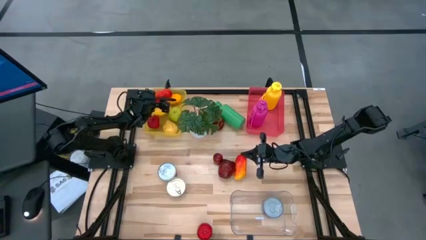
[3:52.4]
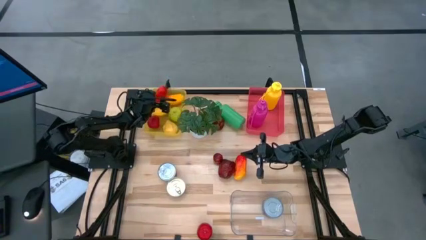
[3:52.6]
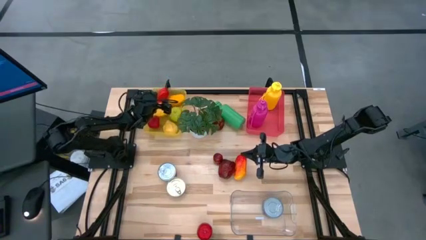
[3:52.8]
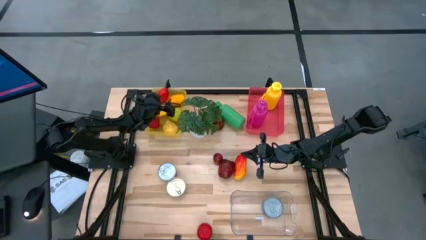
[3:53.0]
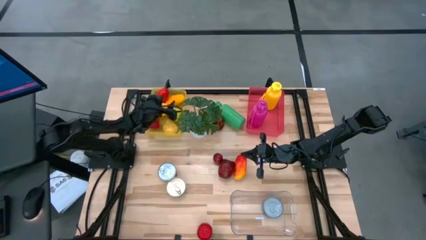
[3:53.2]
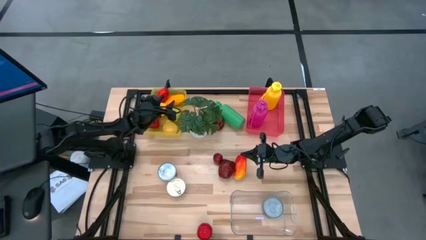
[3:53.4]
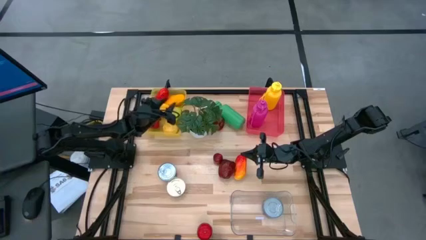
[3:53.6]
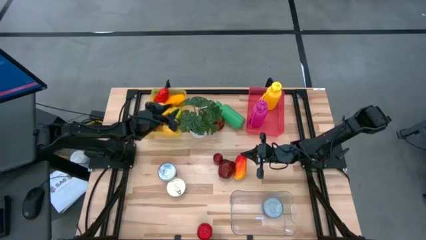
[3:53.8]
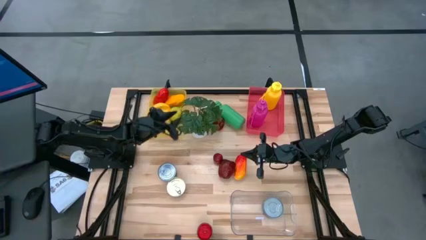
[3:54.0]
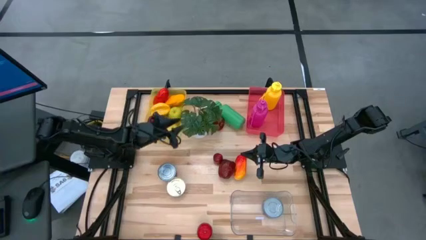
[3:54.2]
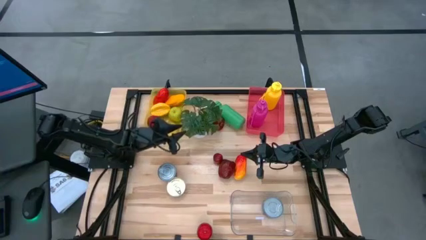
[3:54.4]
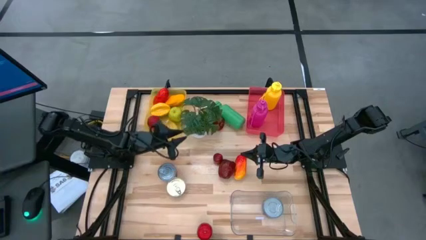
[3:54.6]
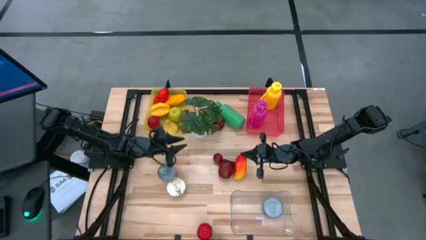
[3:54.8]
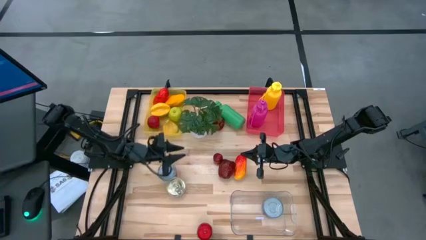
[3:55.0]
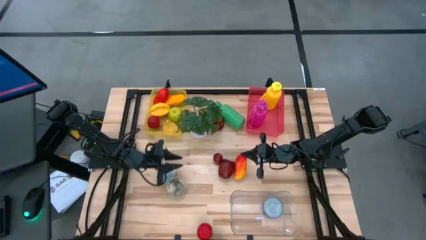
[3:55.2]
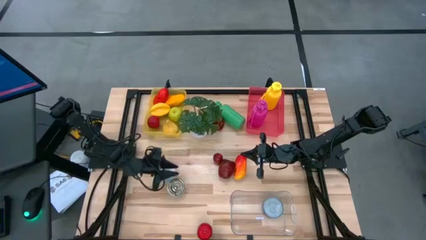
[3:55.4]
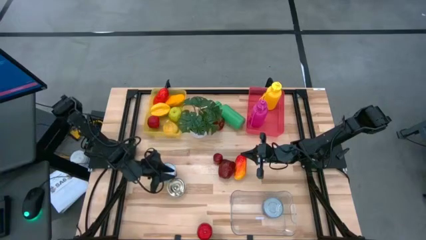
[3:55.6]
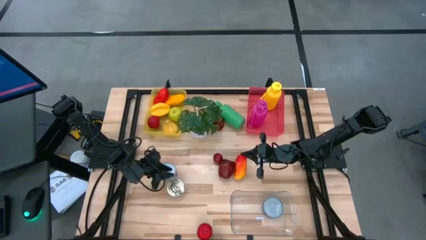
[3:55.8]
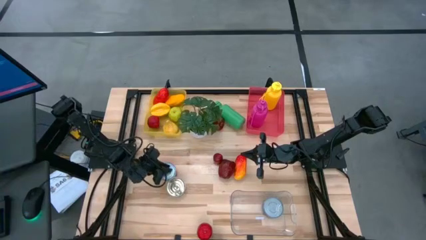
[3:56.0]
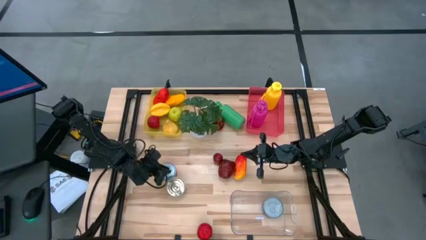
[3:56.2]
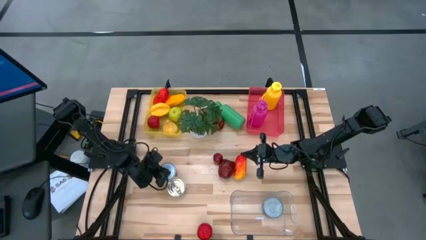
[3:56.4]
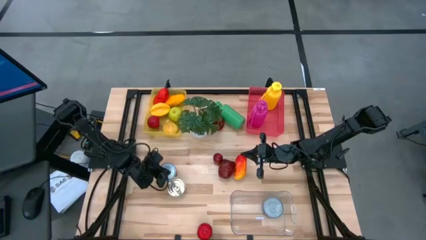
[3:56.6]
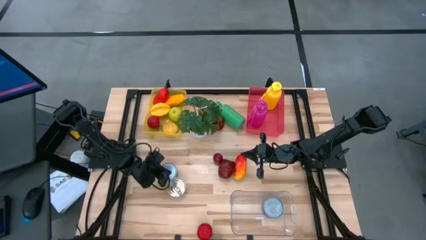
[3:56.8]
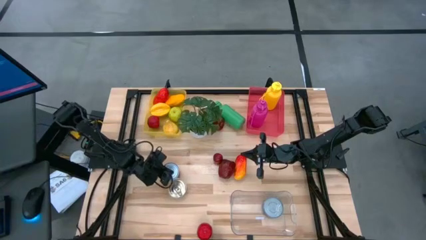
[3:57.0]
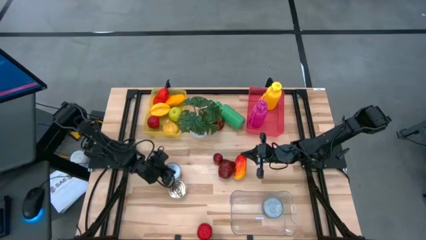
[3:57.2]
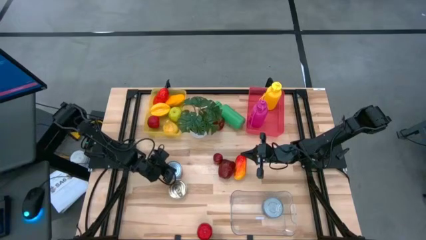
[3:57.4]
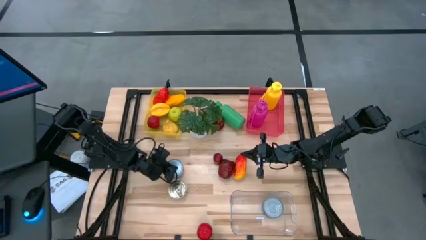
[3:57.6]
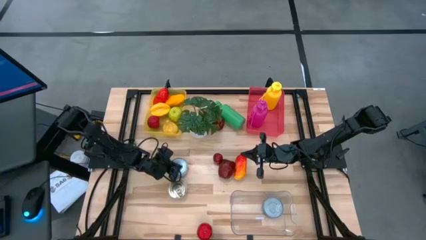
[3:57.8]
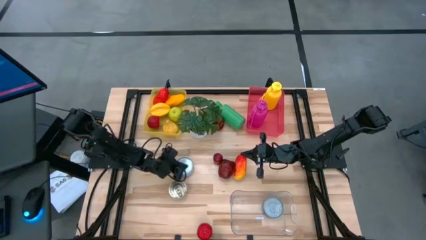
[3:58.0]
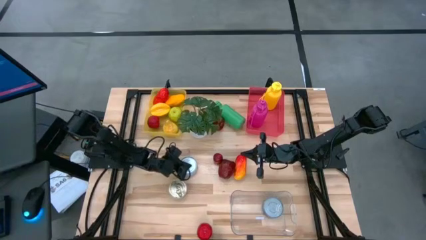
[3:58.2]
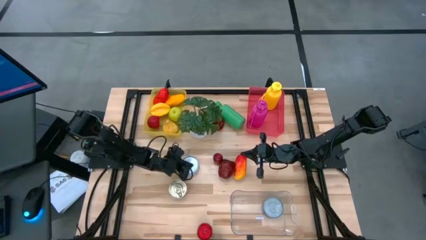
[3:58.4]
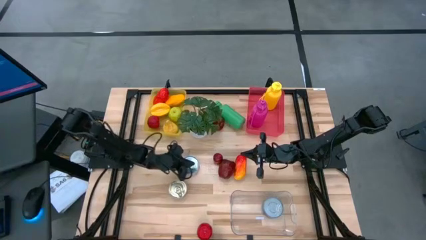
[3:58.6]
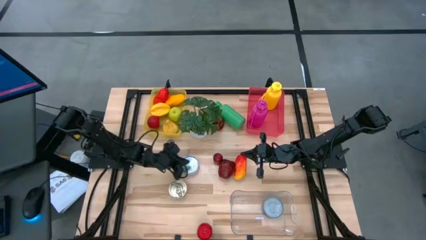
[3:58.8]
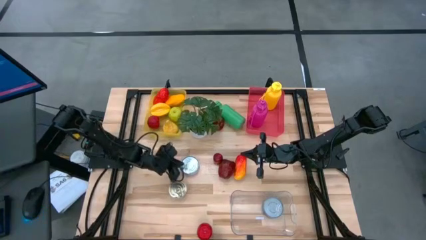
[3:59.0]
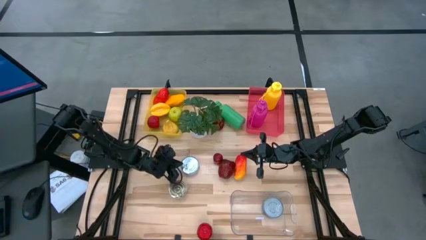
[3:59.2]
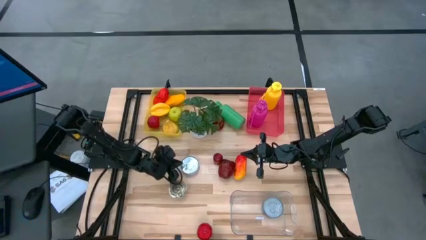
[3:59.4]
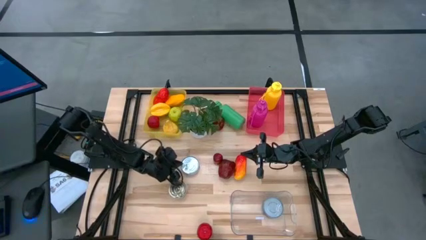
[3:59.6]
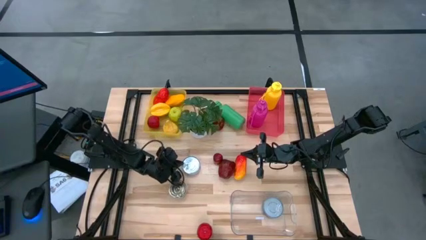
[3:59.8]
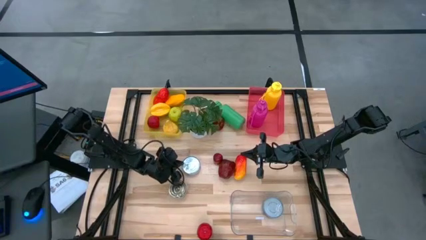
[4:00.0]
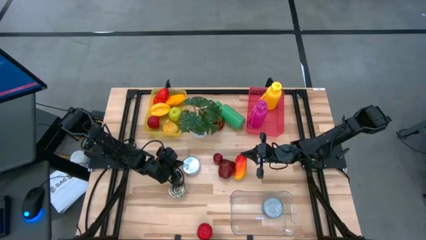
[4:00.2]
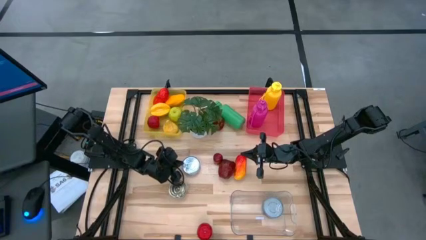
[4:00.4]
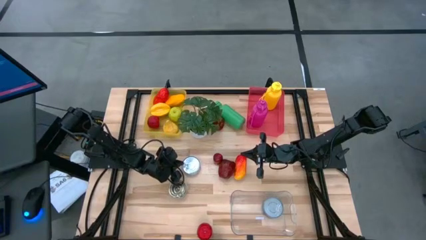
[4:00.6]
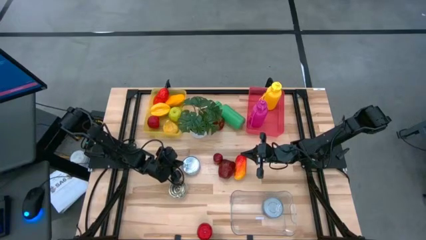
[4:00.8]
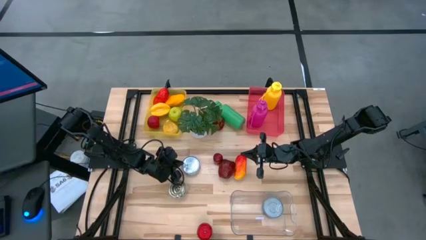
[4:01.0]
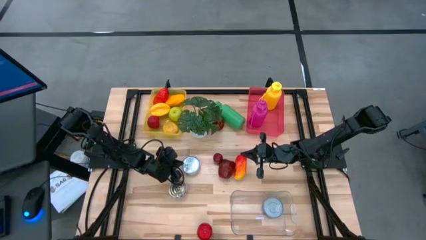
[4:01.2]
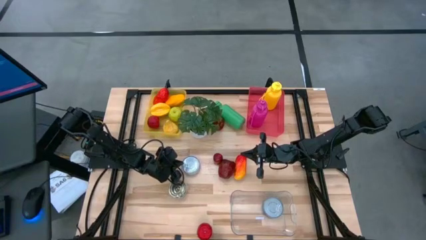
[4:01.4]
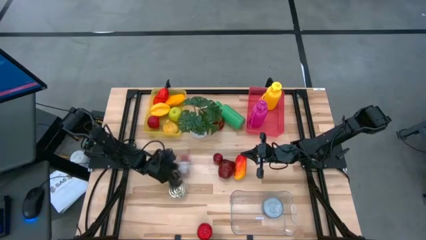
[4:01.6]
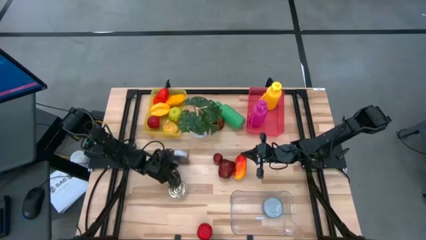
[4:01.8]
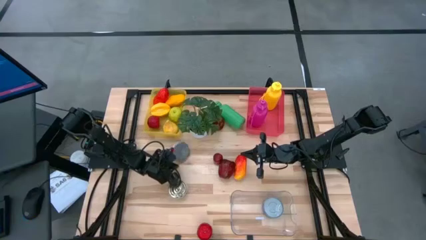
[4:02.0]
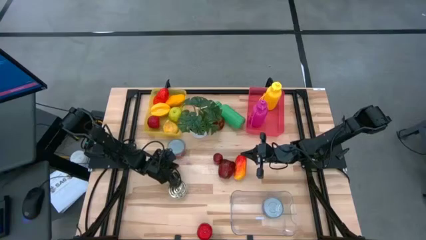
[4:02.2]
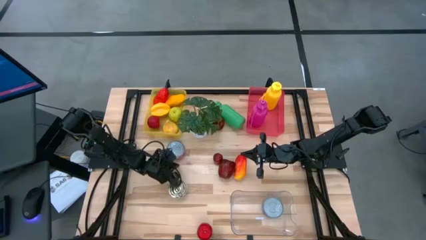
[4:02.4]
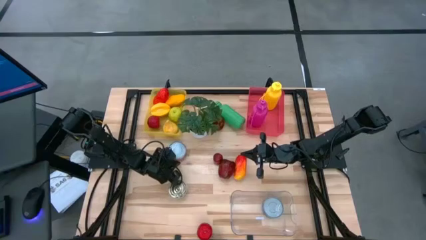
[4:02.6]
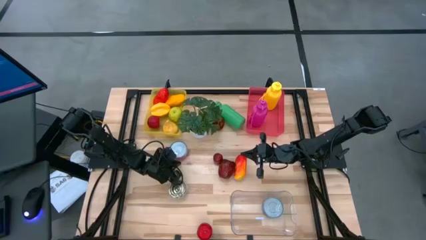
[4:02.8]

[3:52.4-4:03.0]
Task: Pick & Place Food Item
Put the red tuna can into the transparent bin

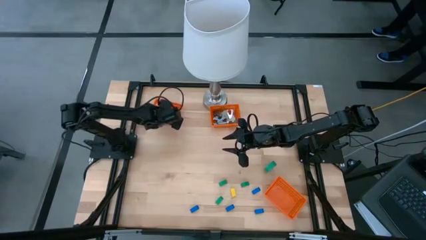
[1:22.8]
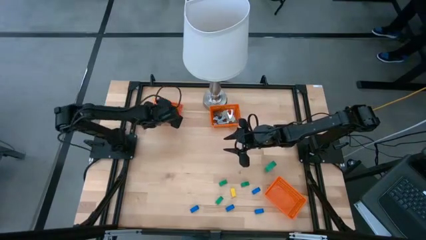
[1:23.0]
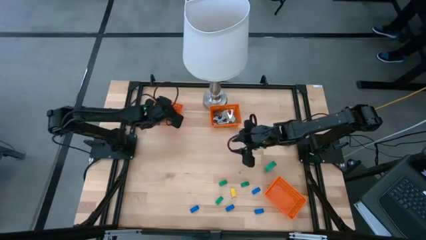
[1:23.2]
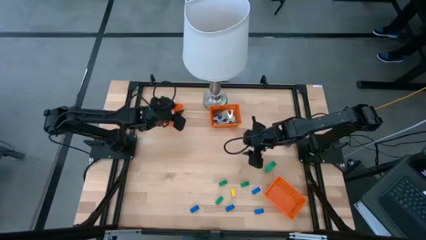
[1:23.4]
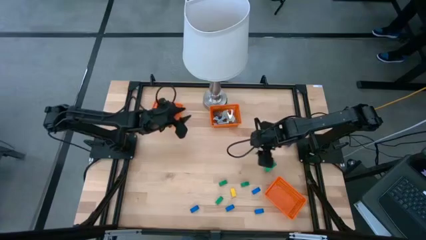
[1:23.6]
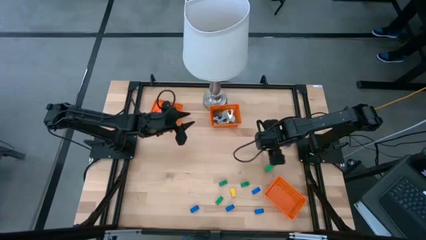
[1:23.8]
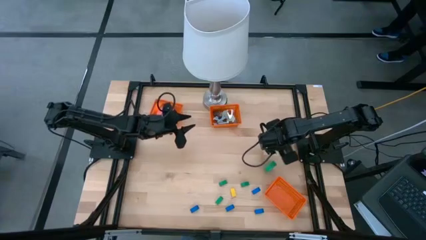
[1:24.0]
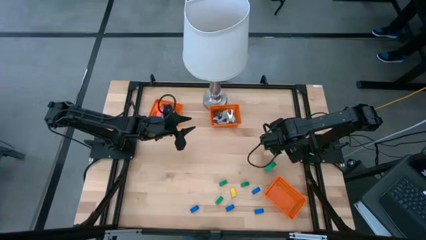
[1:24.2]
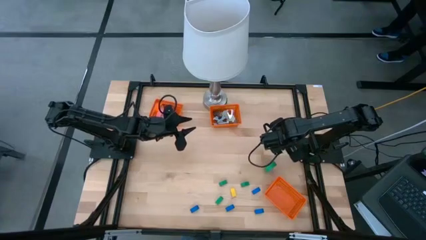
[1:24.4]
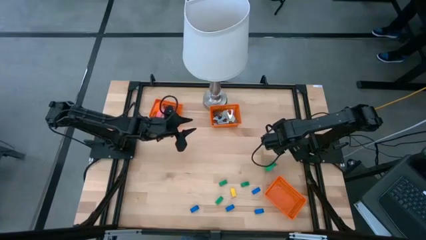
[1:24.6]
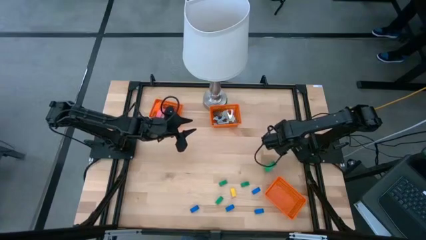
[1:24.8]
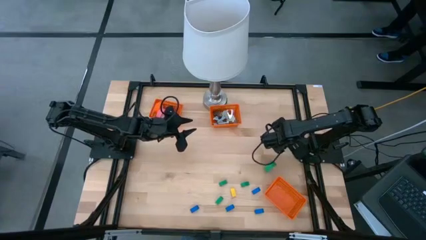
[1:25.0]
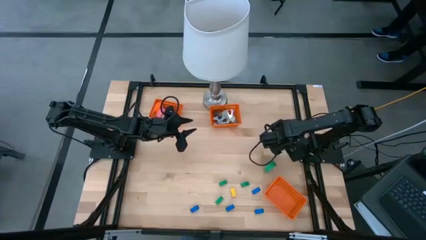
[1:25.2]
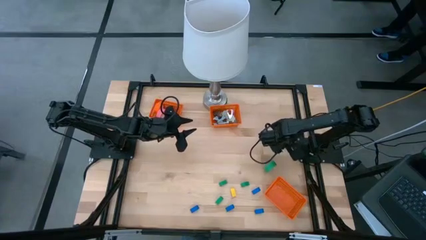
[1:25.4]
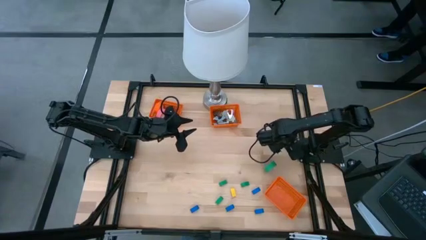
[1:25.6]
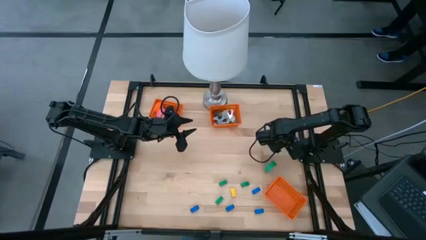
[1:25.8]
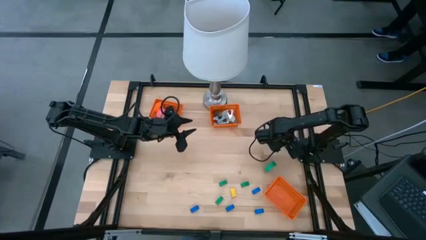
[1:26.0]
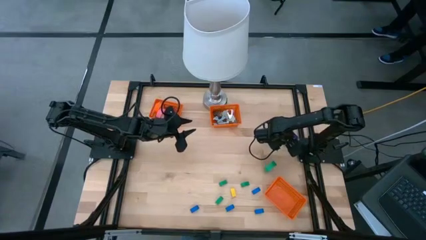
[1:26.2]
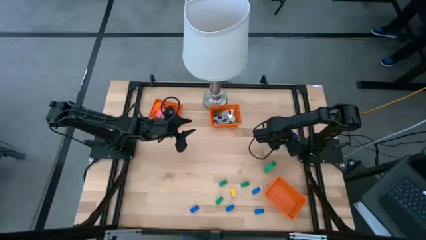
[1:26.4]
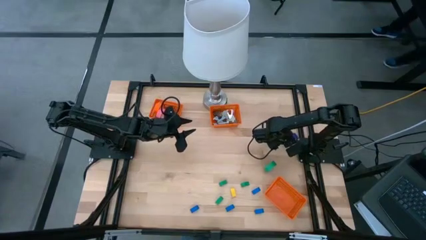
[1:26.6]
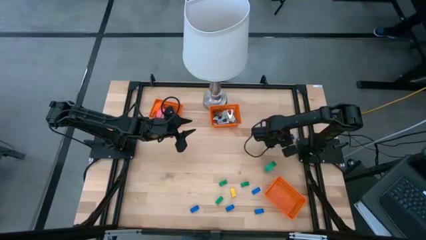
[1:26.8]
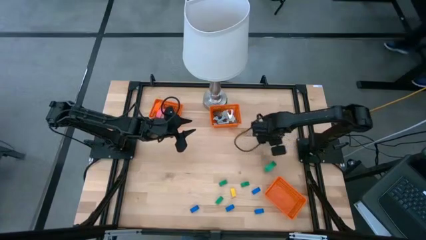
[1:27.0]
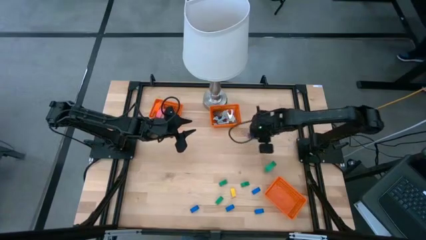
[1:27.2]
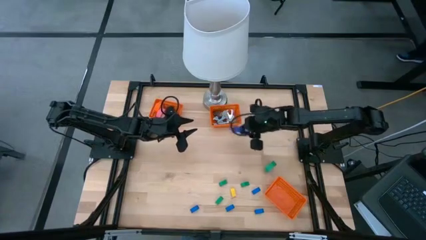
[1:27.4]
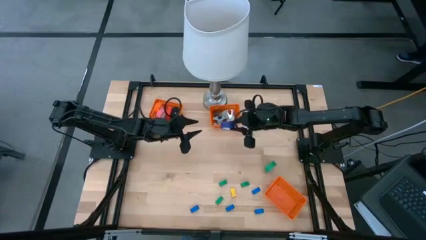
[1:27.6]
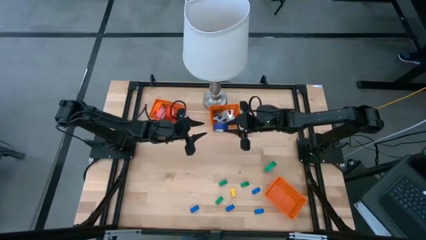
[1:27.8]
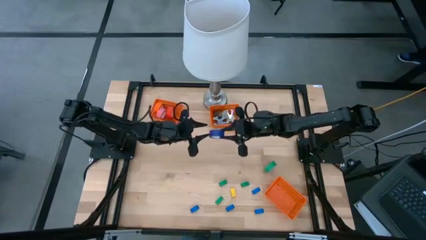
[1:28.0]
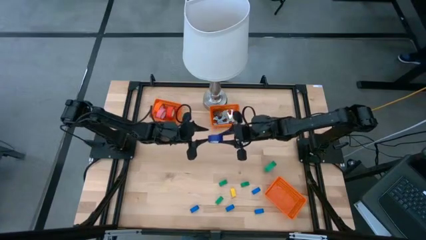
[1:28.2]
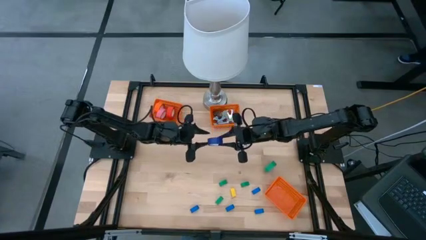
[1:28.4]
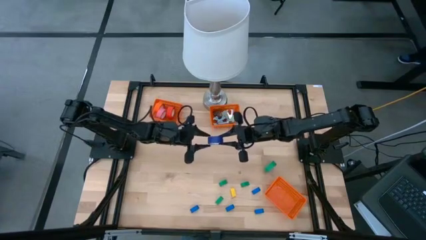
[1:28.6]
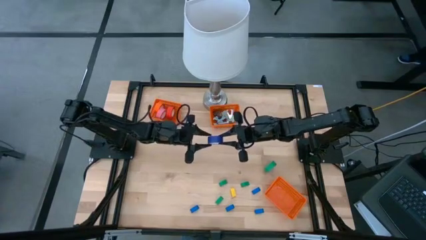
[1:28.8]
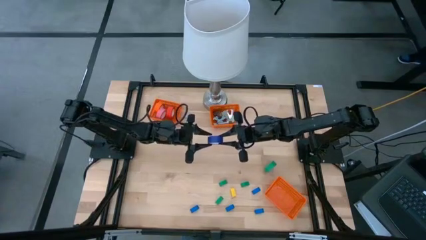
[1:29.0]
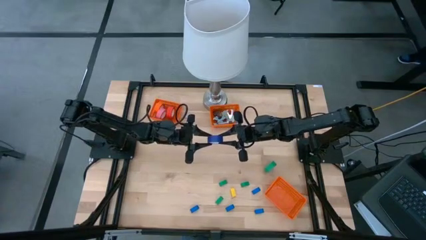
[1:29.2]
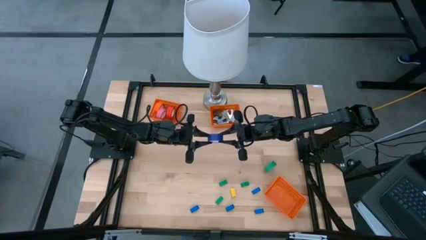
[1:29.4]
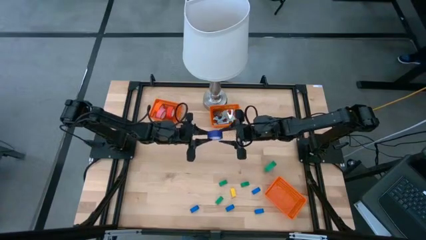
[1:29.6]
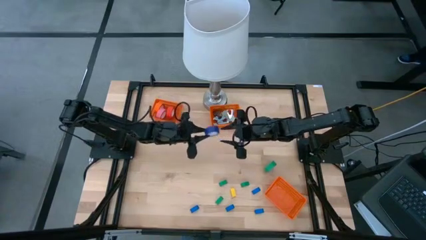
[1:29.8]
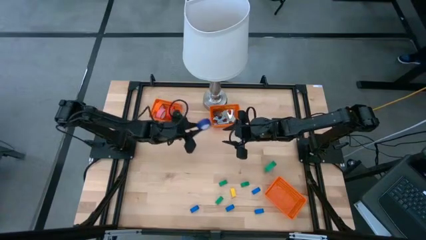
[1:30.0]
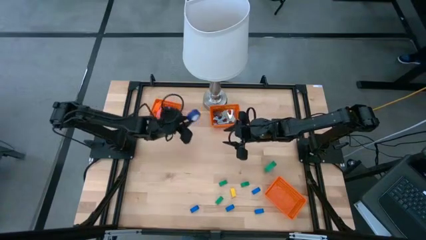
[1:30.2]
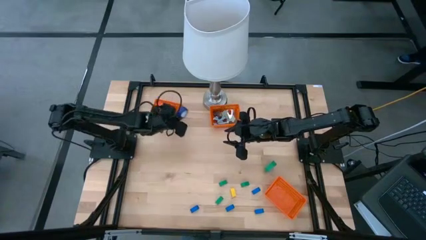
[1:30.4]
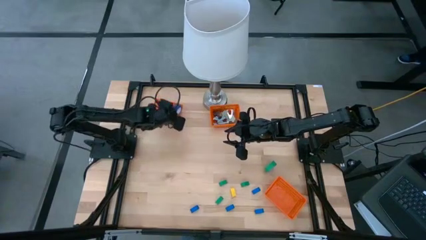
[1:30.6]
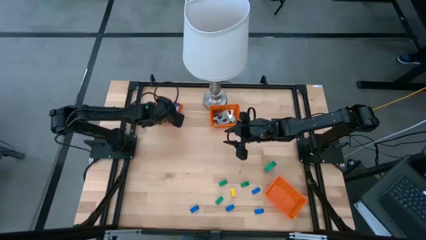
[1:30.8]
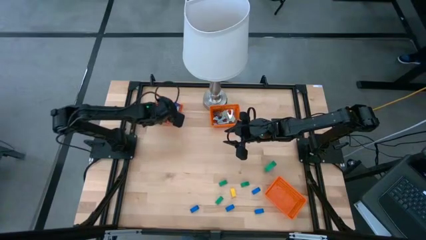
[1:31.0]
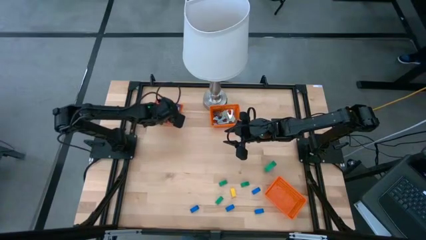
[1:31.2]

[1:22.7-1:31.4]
Task: Pick and place Stapler, Stapler remover, tape
Put the blue tape into the top left orange bin
